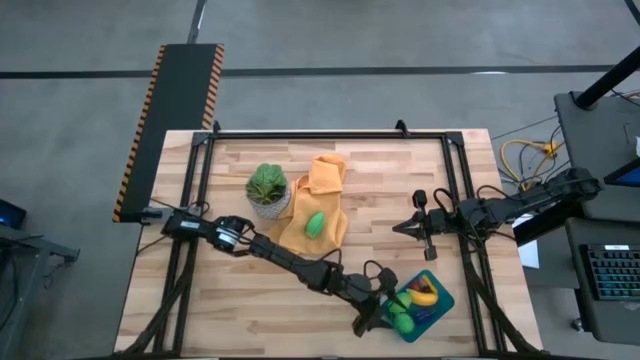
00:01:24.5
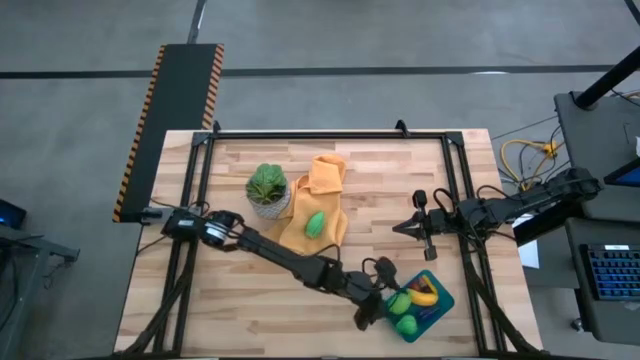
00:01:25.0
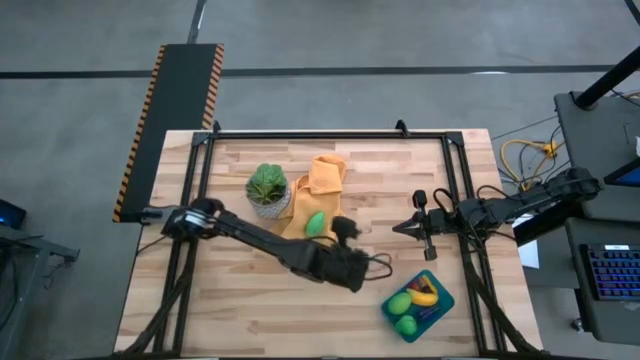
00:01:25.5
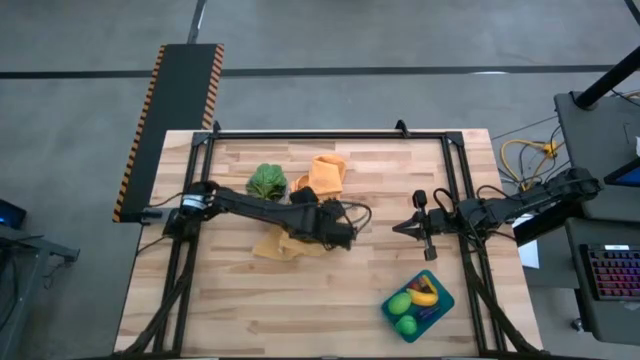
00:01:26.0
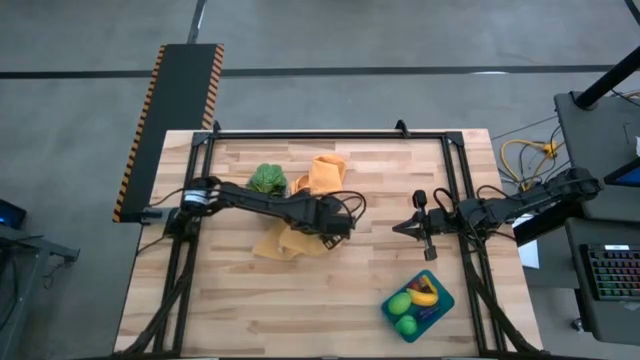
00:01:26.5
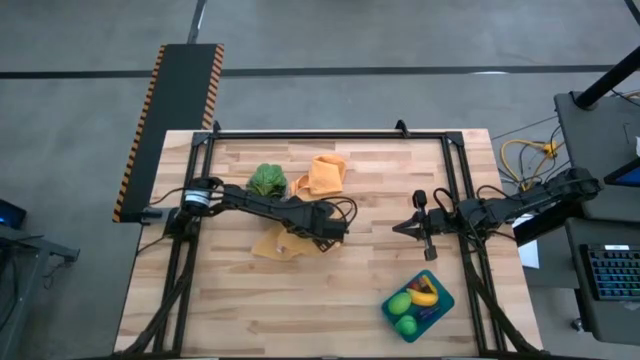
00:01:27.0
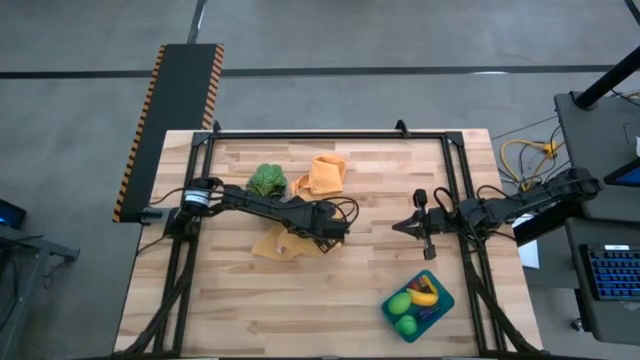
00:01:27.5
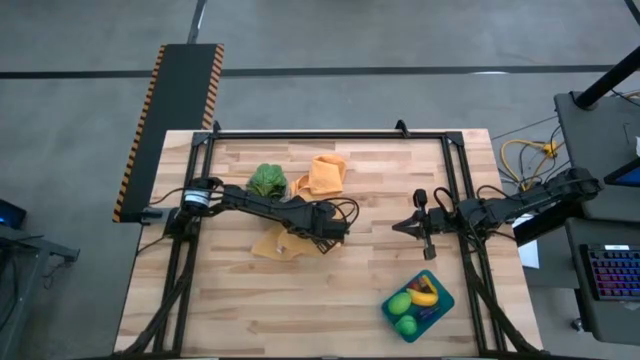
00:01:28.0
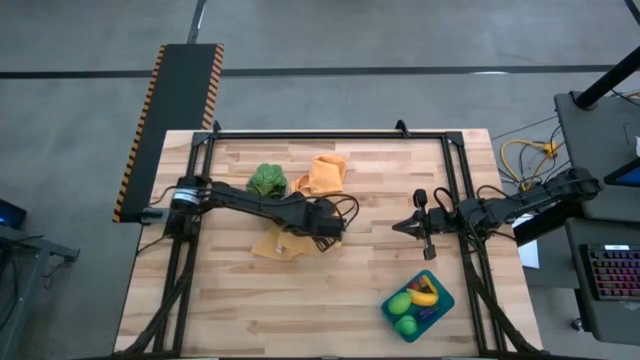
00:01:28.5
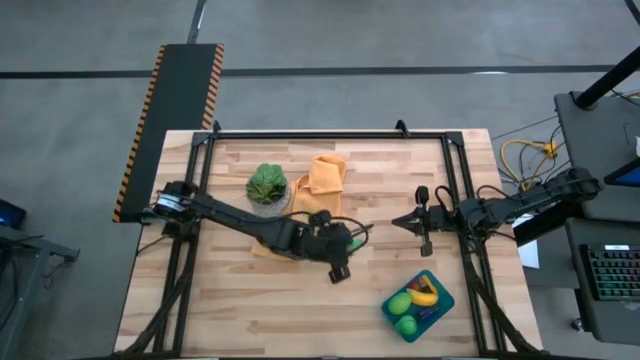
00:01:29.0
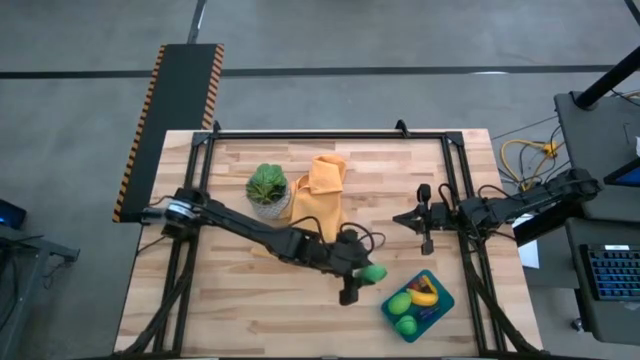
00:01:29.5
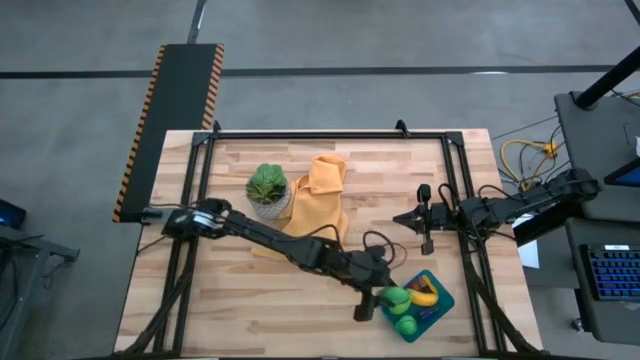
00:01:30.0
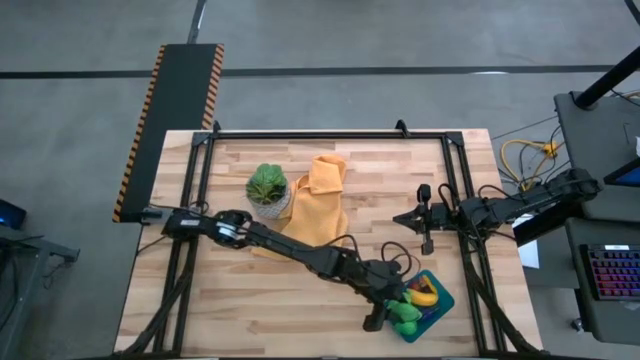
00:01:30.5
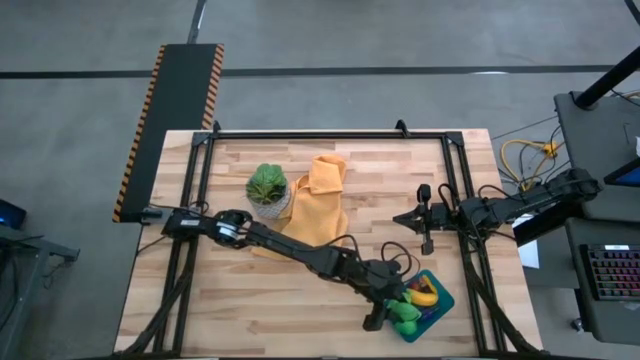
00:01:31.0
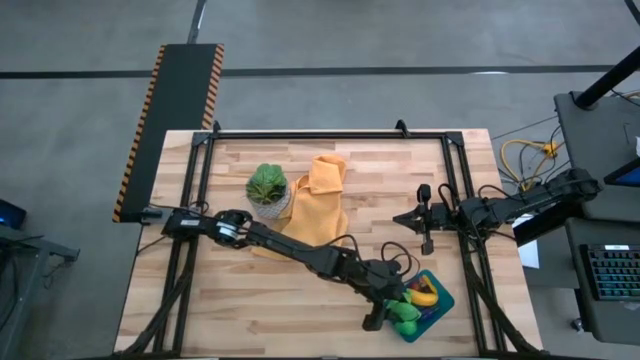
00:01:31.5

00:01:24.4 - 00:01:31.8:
Task: Pick and placing Produce into tupperware
Put the large corn into the blue bin

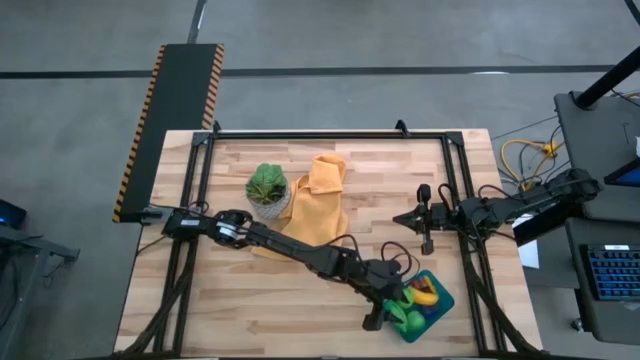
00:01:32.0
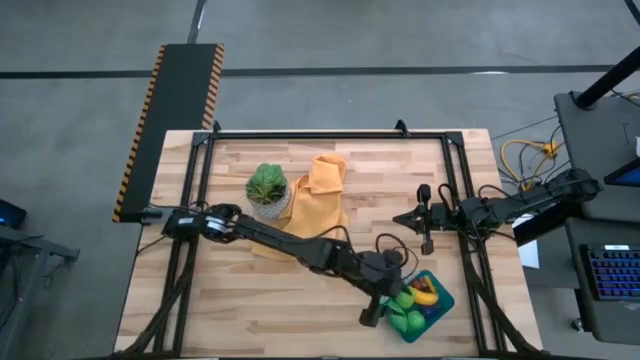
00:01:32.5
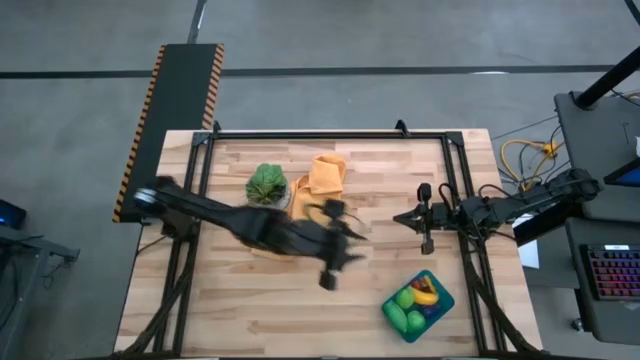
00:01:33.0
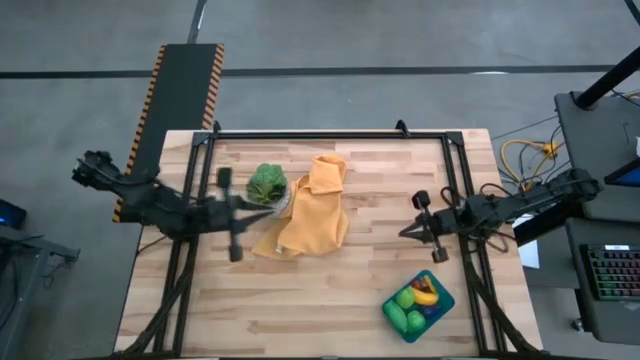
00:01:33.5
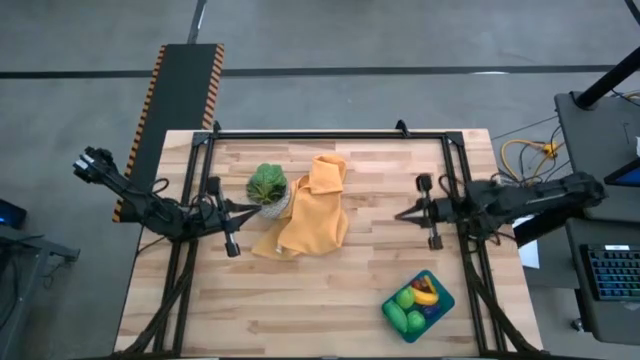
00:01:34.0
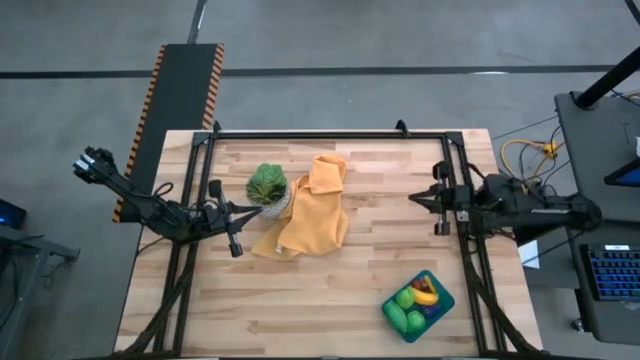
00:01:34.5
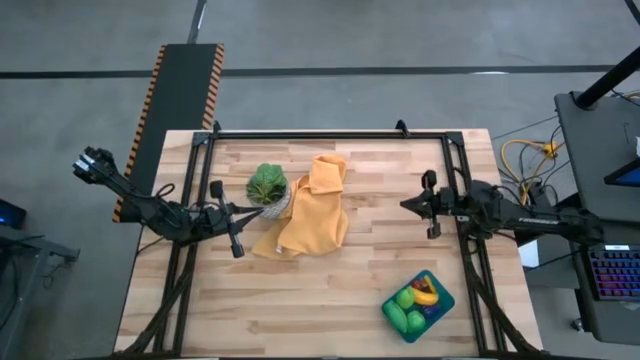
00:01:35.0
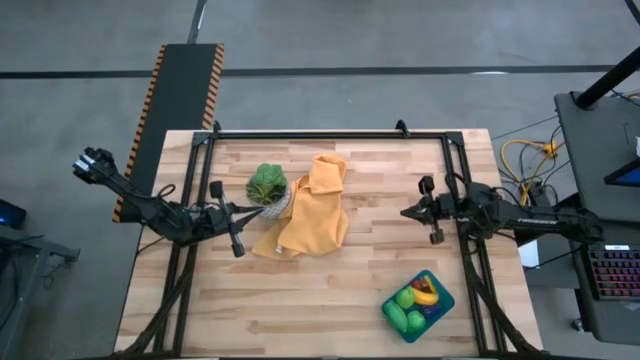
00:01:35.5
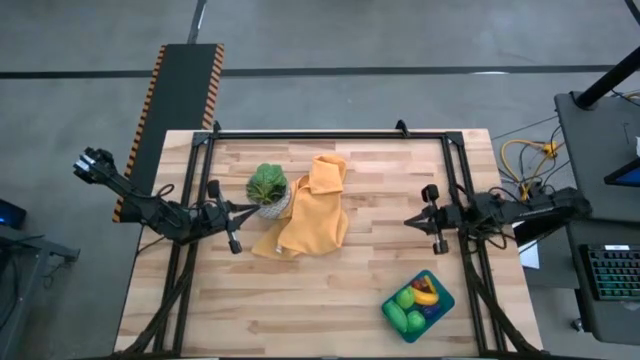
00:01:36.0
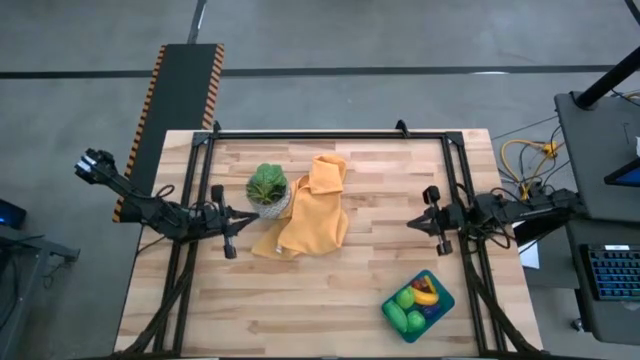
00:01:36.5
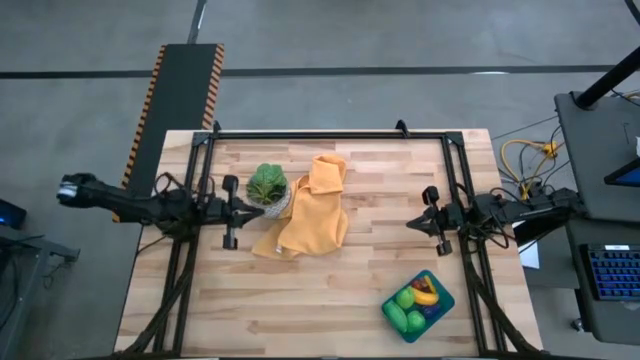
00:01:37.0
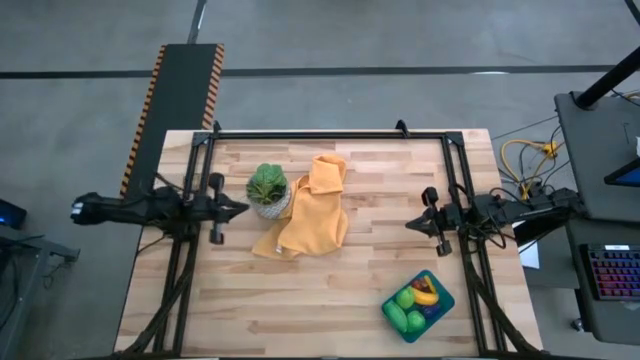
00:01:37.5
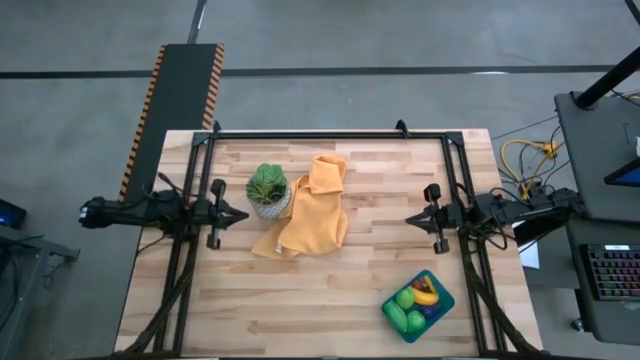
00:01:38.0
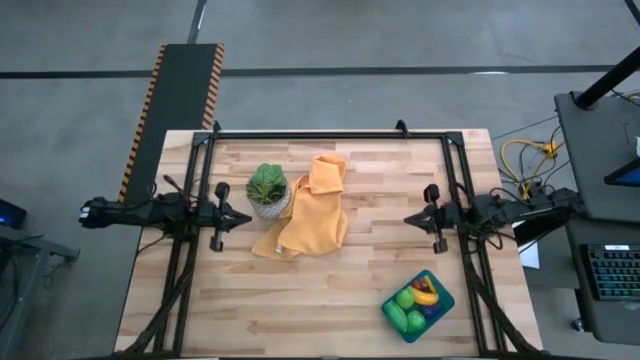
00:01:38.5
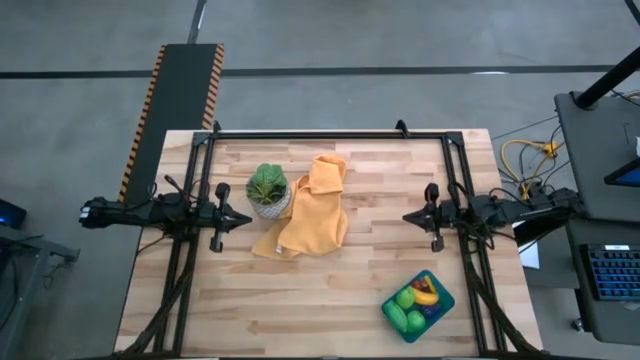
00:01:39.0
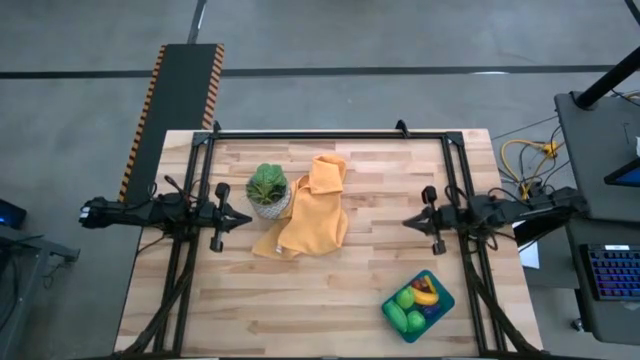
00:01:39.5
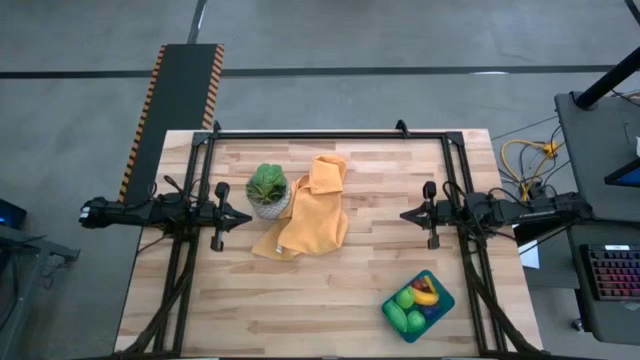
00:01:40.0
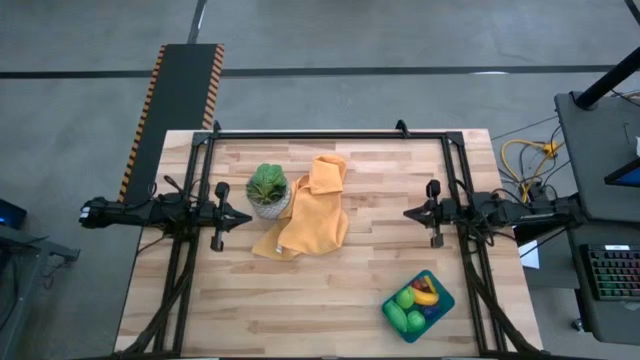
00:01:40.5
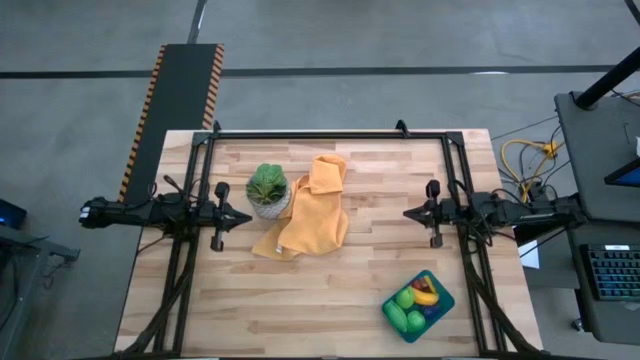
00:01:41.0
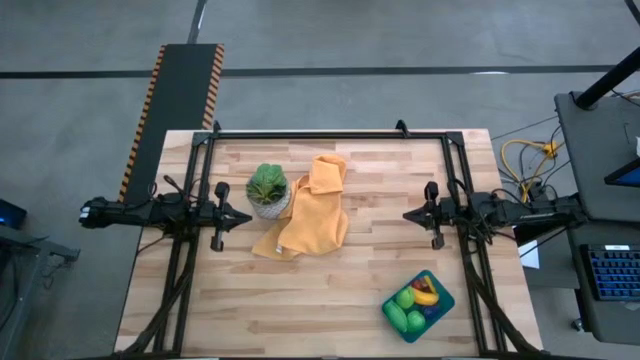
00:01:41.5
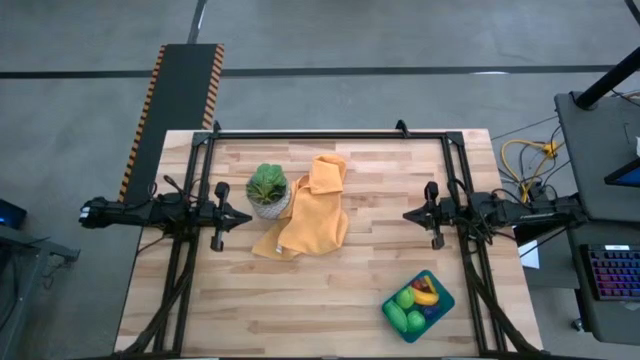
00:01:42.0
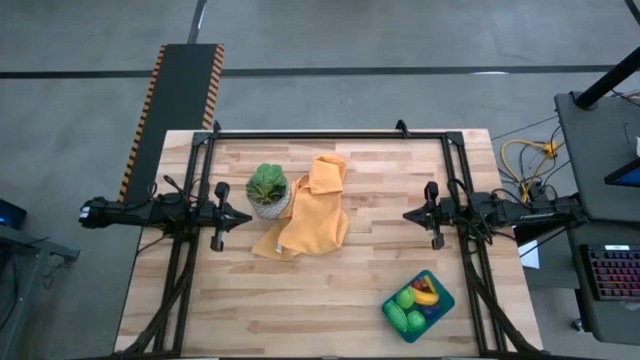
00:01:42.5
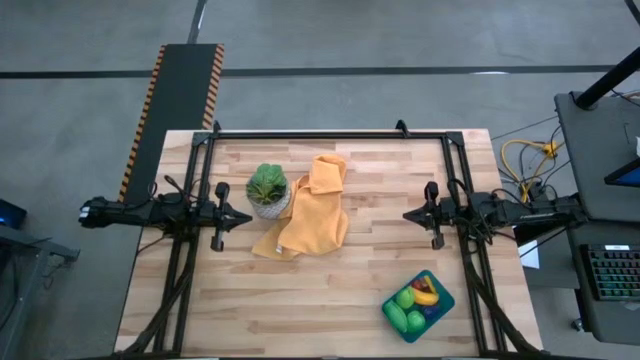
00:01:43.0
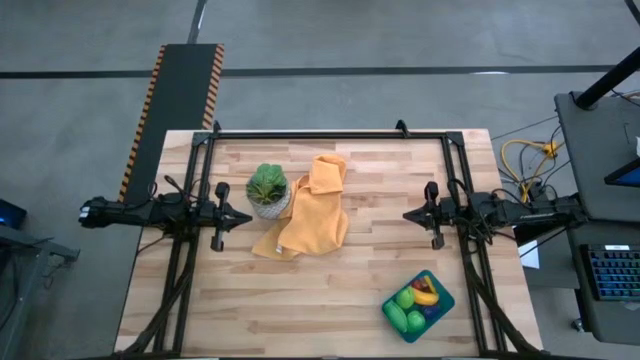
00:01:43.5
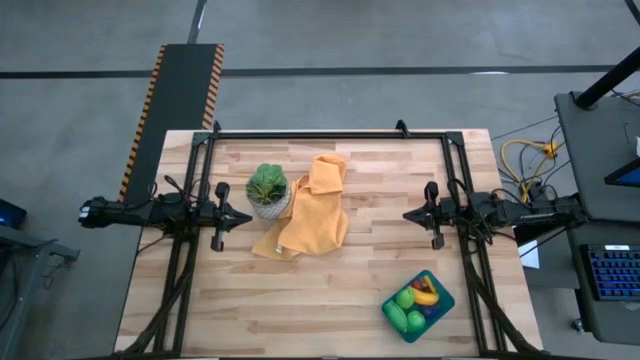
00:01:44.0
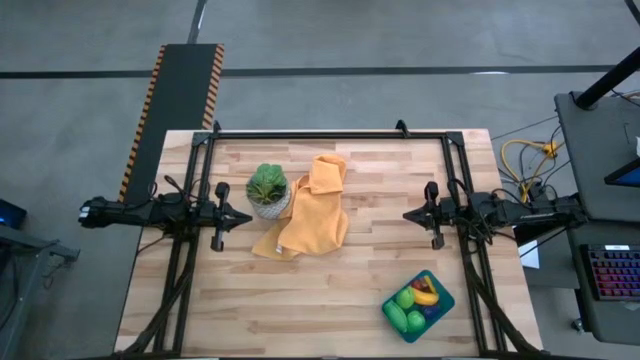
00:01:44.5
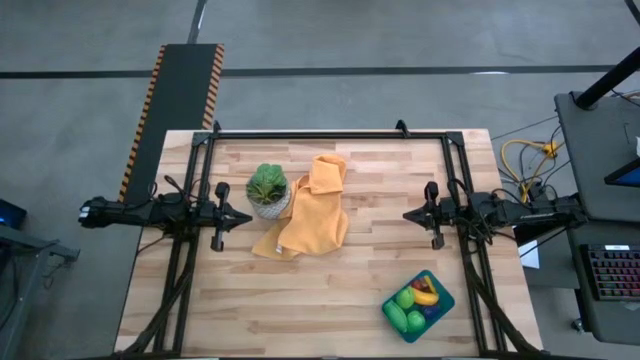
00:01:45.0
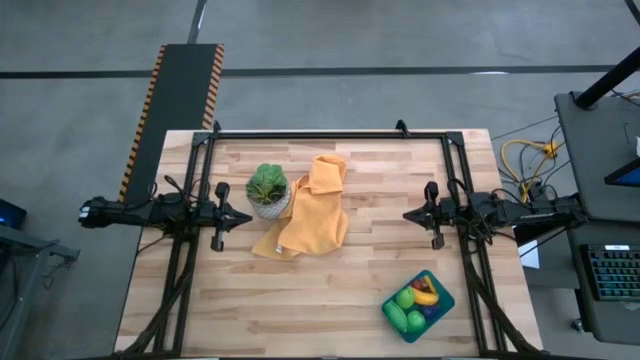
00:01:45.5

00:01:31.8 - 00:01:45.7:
Return to Home Position
